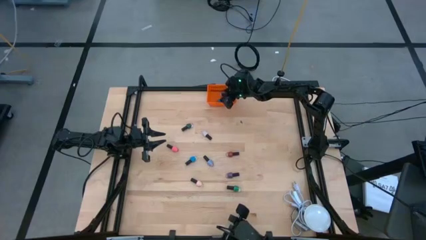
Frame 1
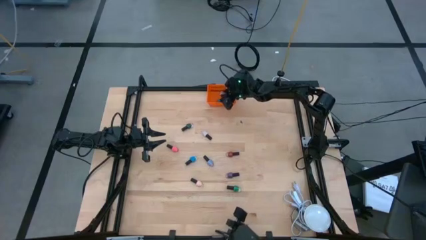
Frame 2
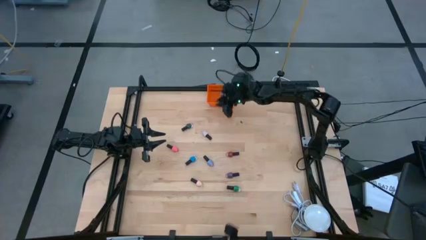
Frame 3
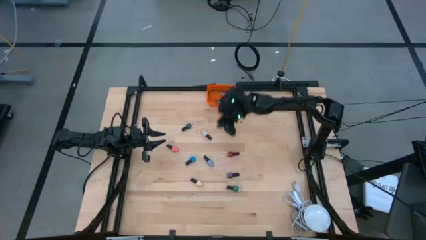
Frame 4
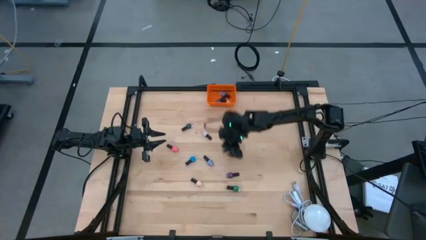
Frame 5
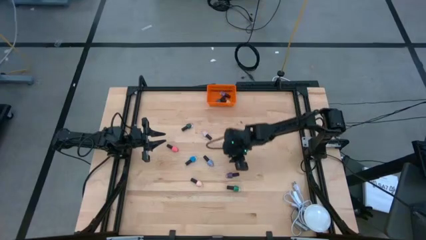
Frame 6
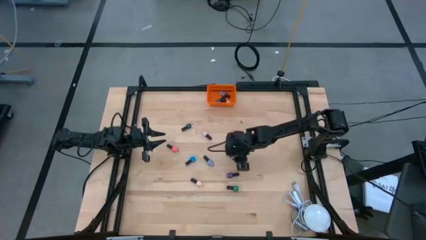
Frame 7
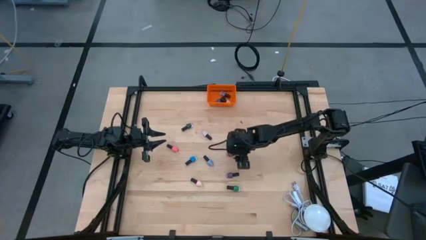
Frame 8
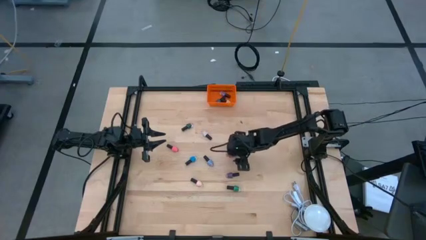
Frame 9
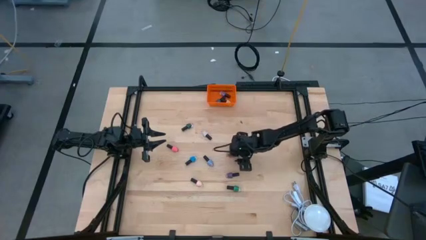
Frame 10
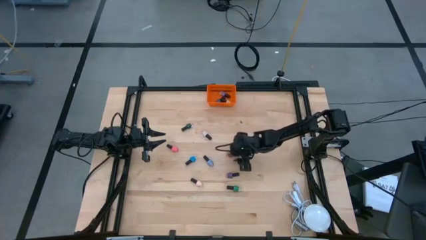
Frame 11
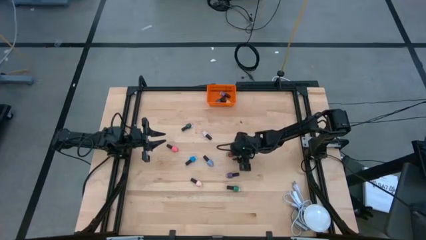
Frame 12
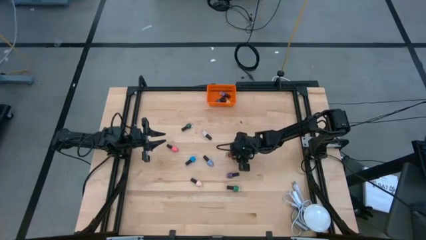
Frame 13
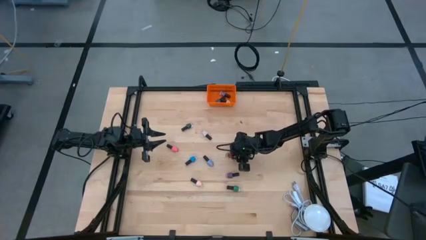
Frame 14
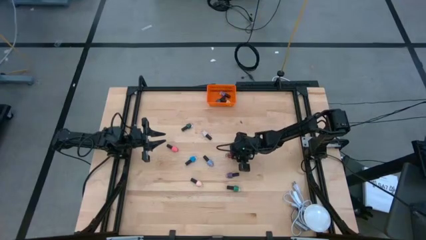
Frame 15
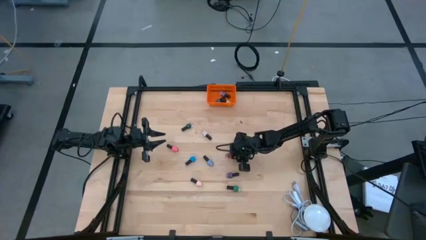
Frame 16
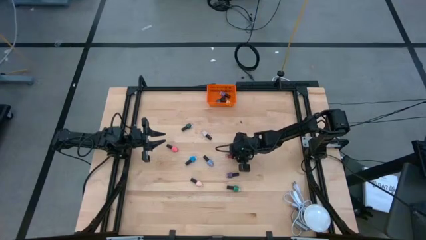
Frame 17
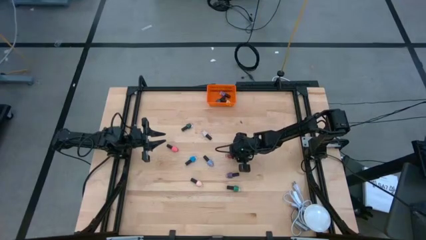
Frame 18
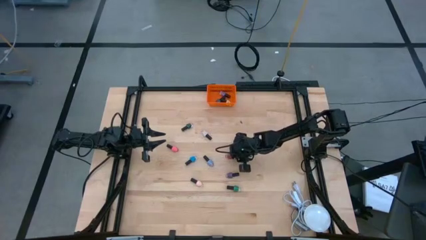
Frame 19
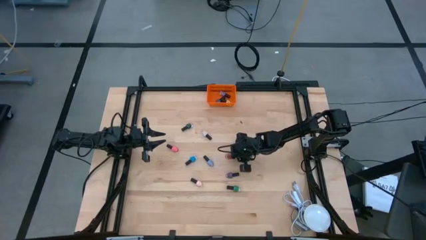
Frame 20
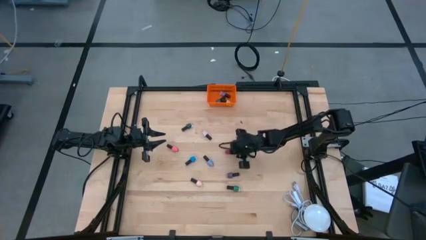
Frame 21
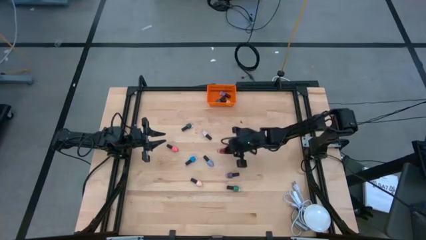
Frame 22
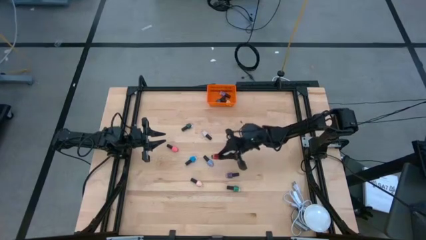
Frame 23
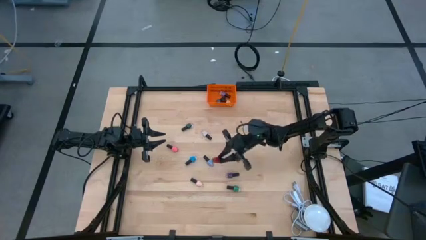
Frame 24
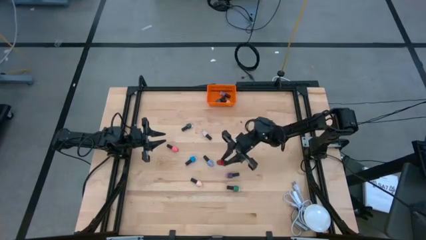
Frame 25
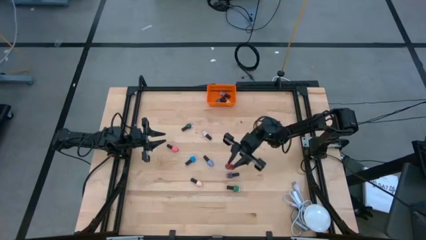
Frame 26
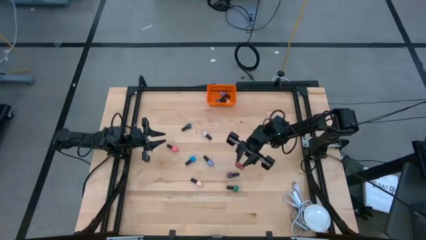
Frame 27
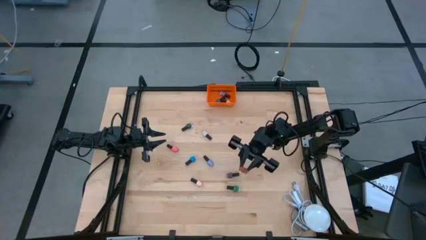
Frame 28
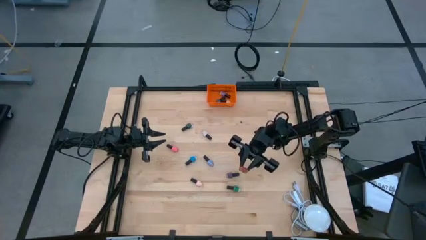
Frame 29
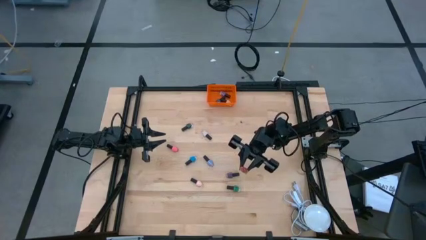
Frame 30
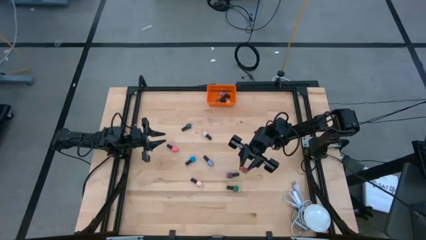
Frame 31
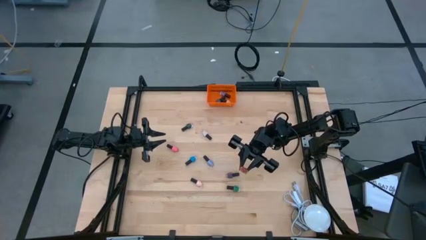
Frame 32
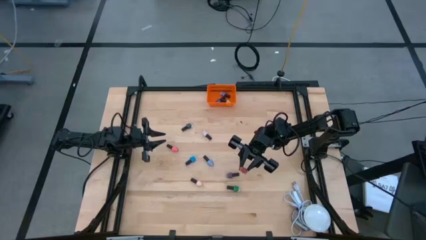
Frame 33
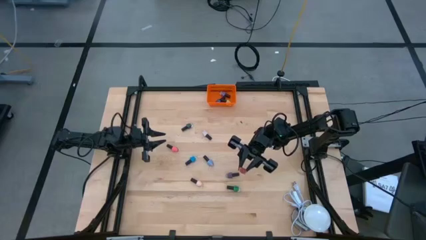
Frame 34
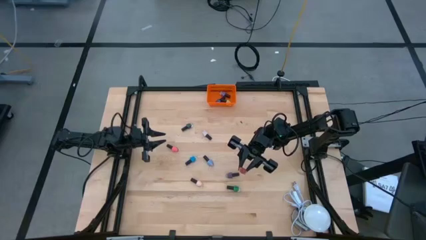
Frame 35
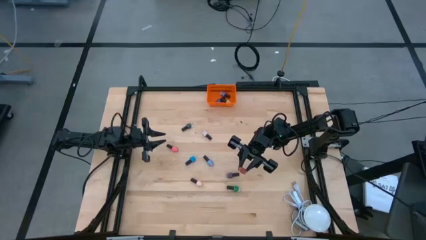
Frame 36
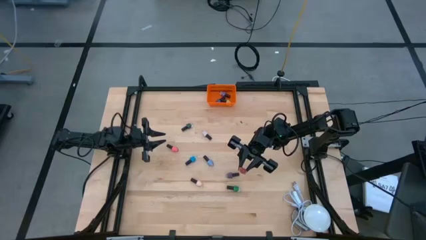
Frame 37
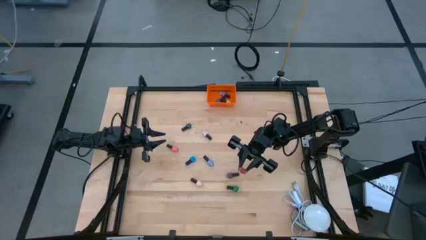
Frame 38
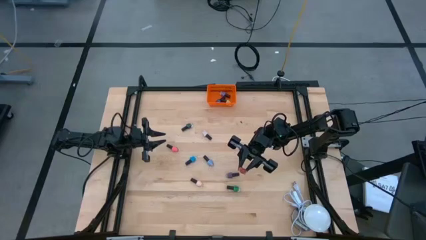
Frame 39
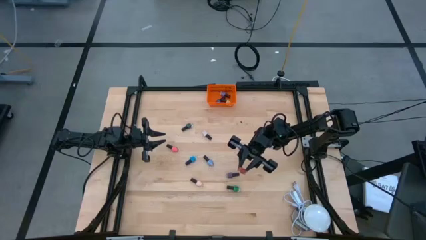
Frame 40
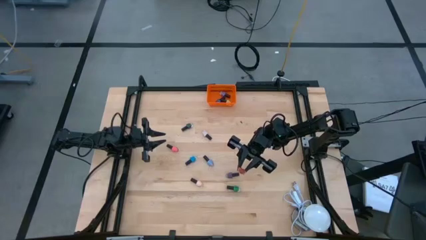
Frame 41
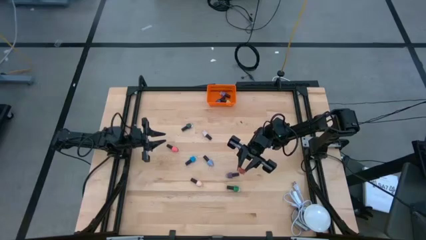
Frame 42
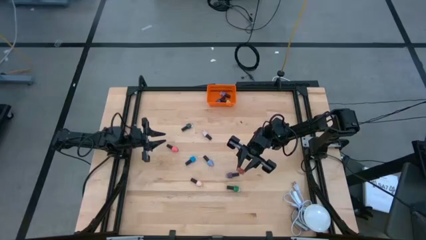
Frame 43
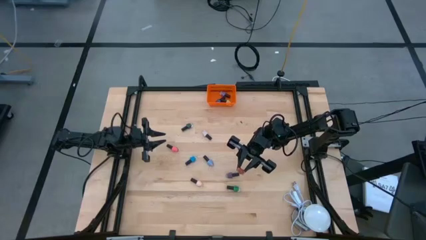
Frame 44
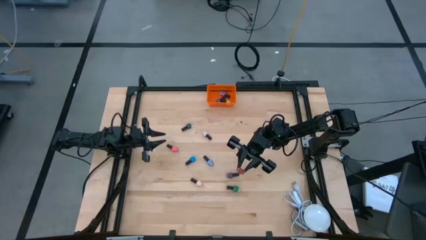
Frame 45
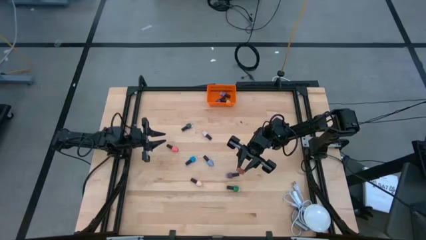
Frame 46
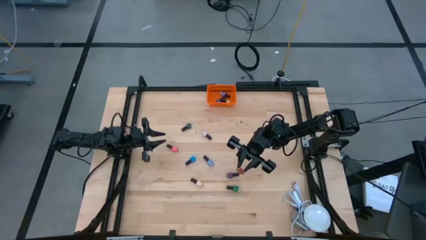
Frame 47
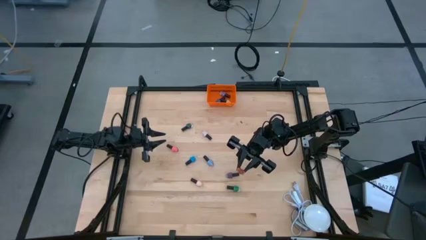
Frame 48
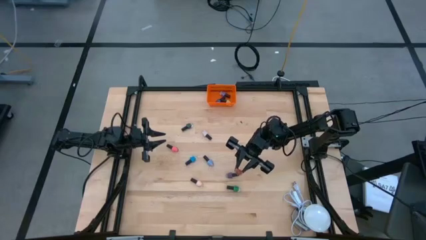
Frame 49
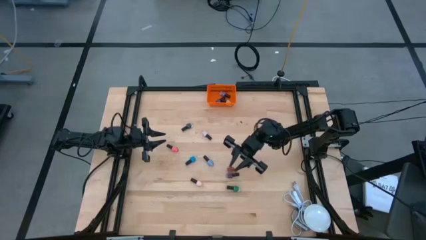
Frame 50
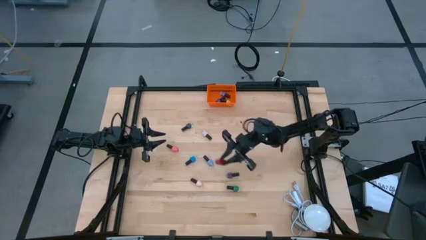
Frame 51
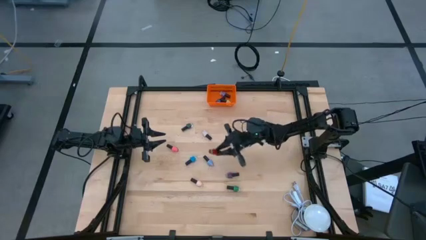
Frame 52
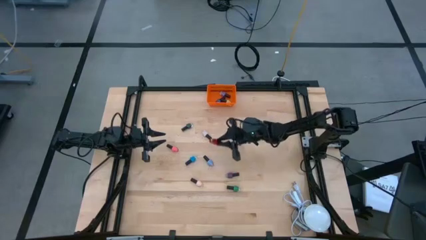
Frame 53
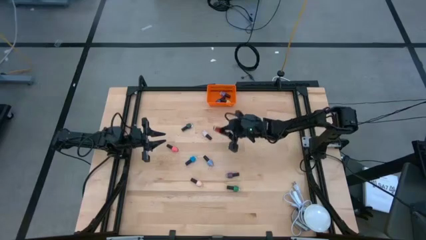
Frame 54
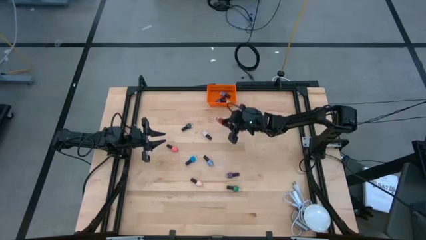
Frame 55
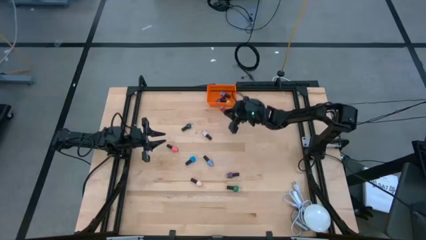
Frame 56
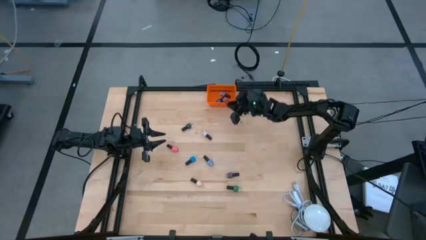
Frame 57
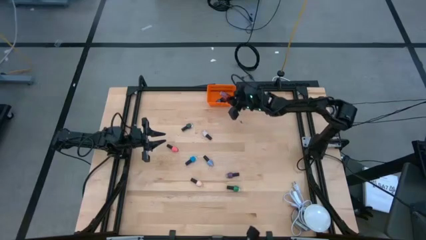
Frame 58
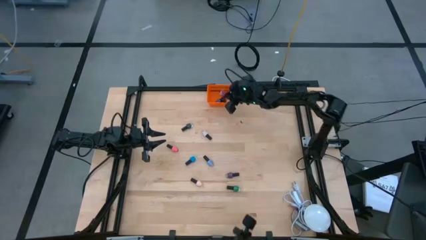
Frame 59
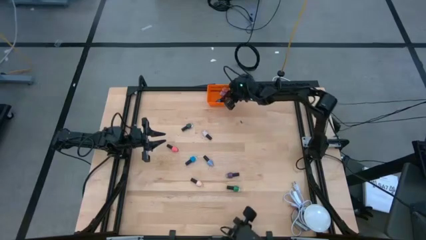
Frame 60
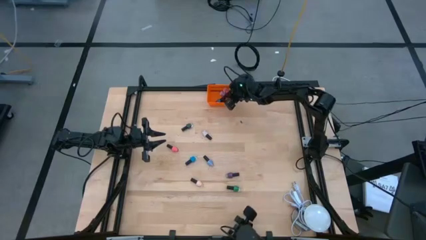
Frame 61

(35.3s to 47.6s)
Task: Pick & Place Nail Polish
Put the red nail polish bottle into the basket
